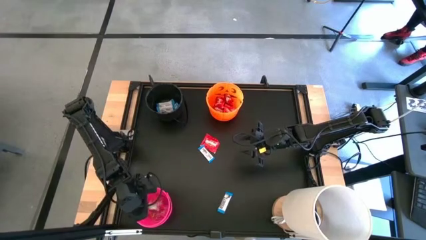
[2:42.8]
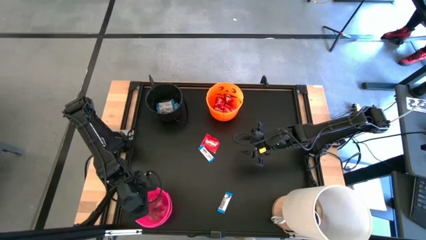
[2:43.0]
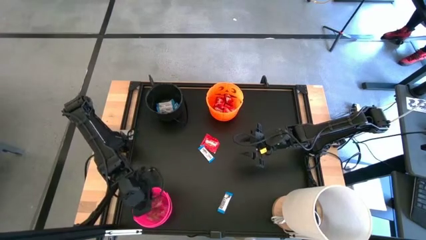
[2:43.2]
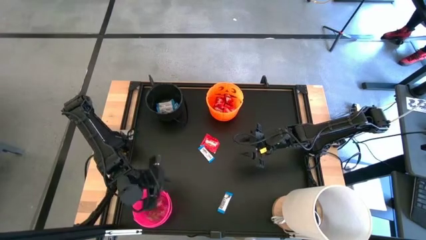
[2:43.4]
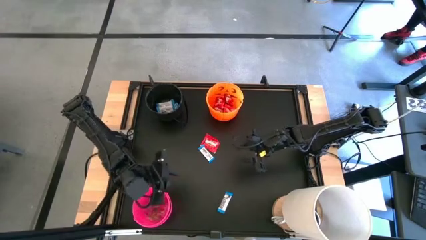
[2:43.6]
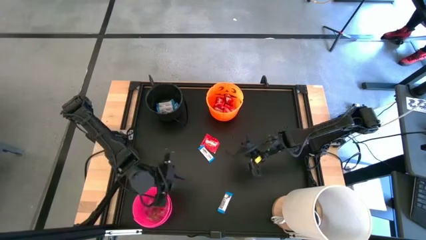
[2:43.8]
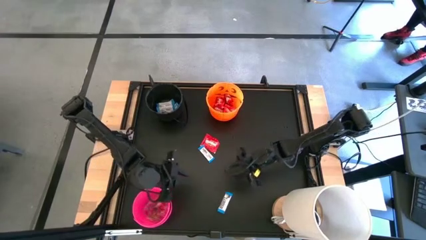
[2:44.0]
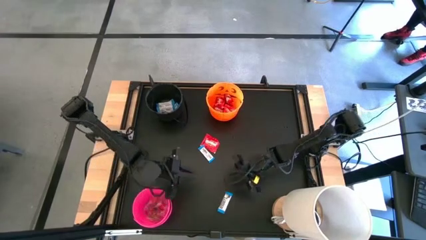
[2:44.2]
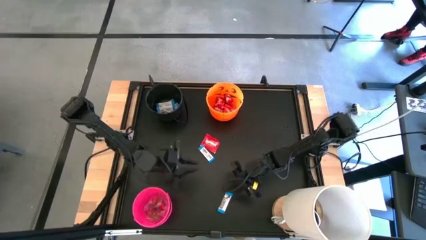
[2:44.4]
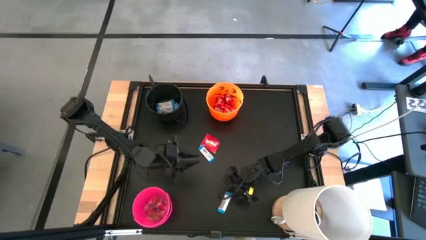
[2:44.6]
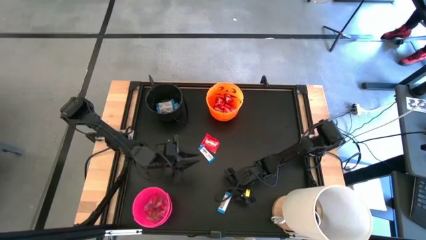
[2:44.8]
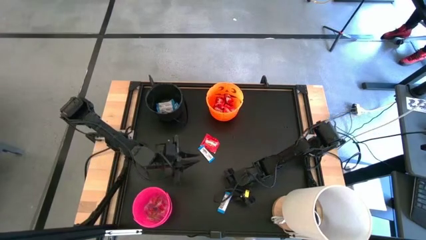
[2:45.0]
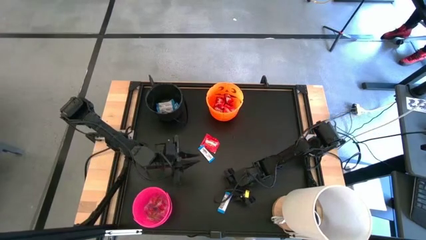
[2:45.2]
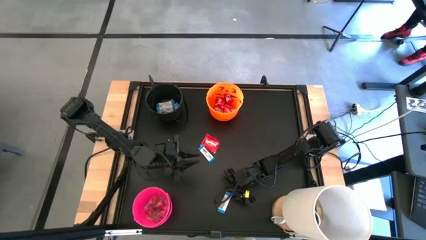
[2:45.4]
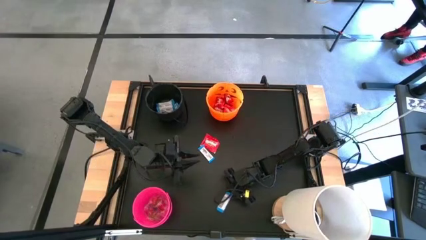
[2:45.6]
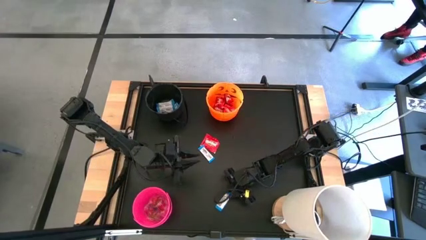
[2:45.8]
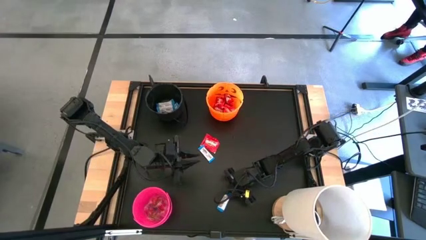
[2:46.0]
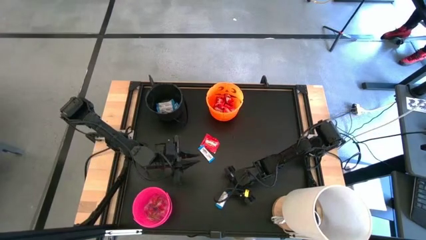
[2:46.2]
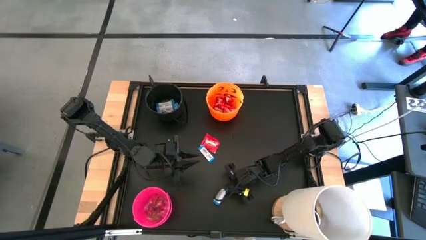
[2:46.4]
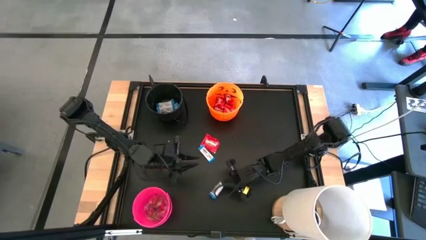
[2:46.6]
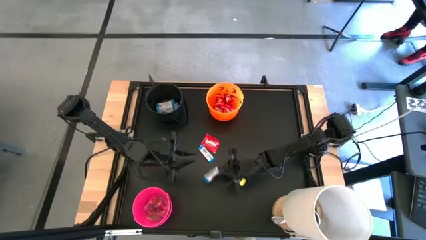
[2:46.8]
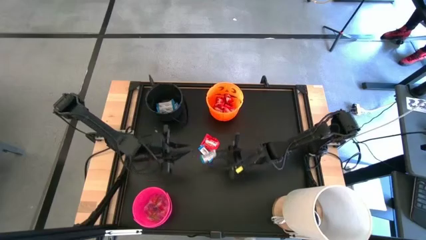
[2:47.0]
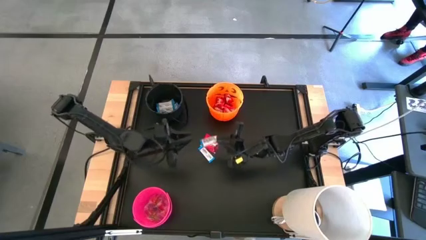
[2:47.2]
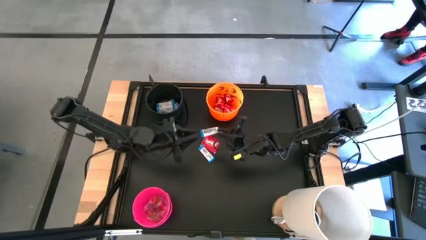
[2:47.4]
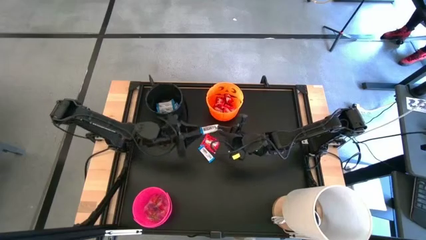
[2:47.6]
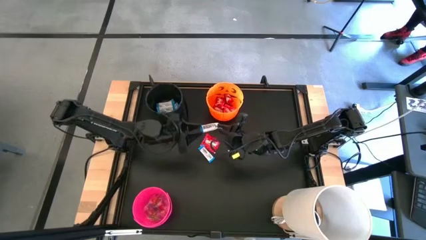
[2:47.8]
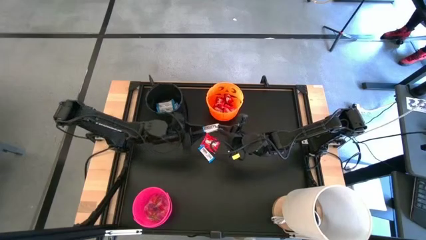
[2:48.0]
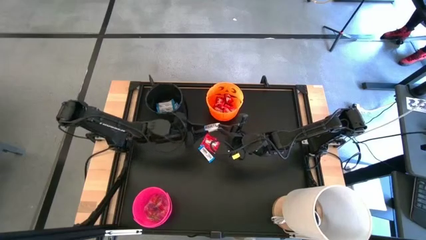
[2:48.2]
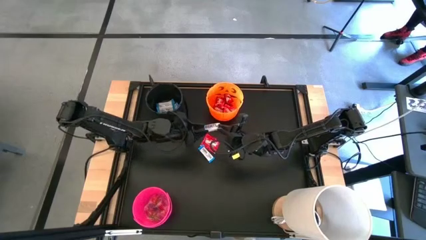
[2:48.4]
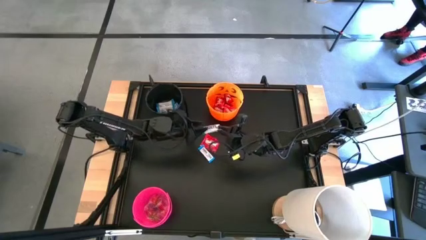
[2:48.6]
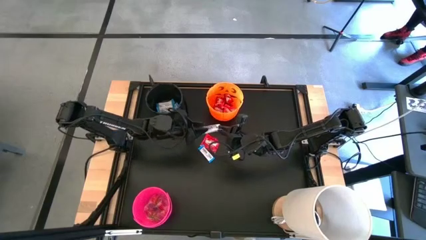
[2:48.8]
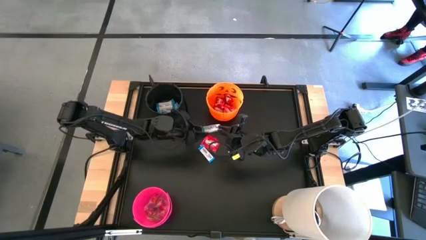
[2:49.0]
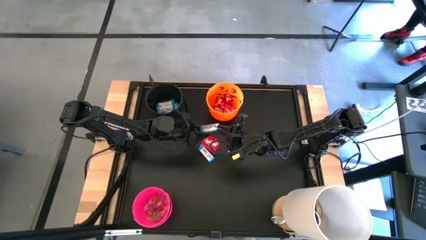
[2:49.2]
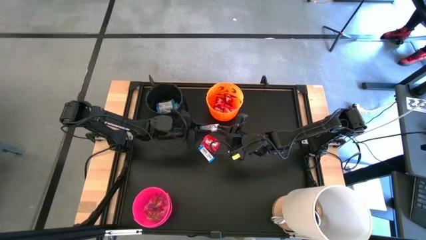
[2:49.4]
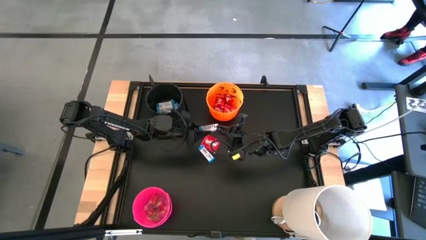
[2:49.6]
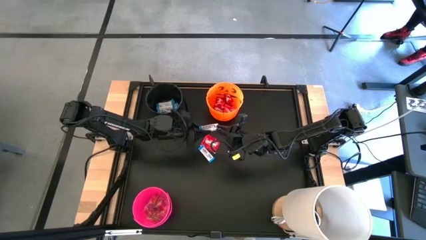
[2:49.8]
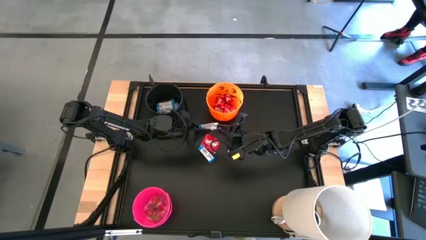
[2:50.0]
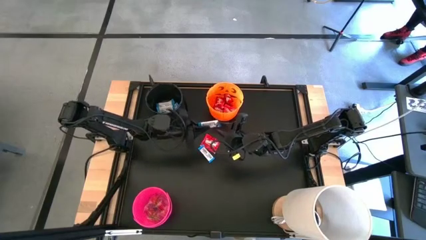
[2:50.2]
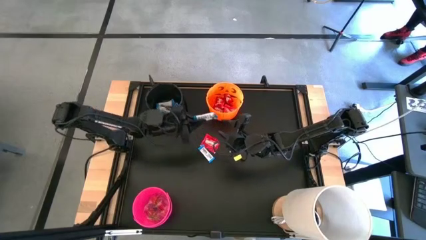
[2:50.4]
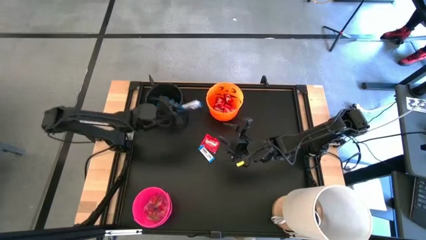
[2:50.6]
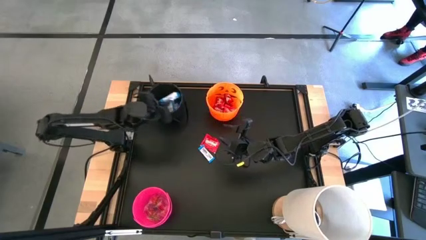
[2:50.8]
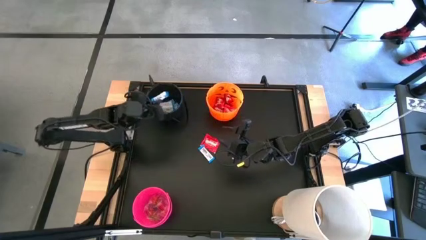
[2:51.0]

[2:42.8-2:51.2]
Task: Sort candy
Put the bottom white candy into the black bin

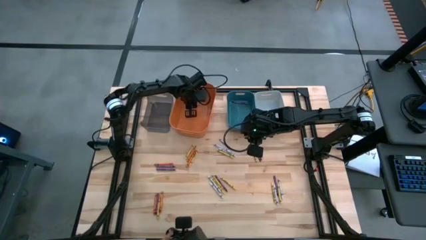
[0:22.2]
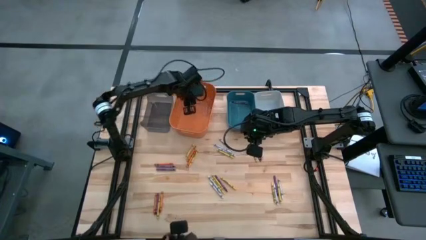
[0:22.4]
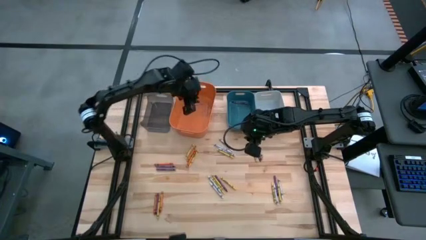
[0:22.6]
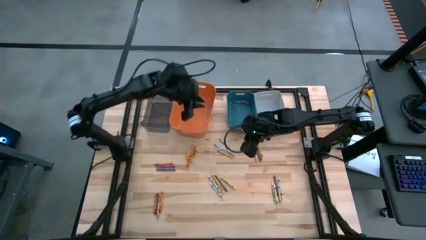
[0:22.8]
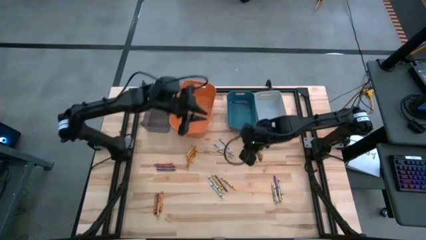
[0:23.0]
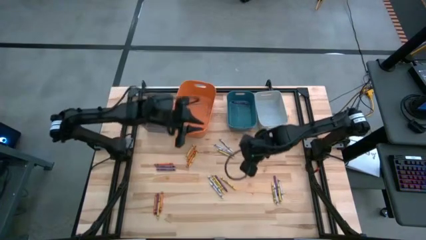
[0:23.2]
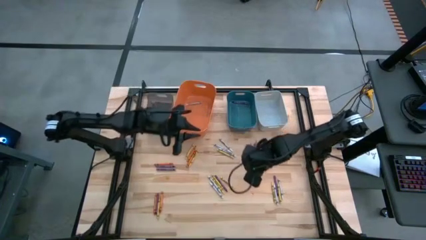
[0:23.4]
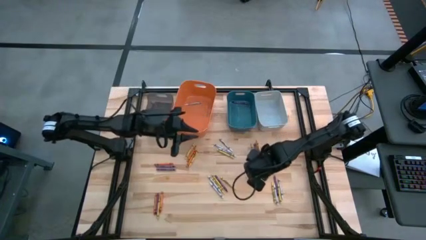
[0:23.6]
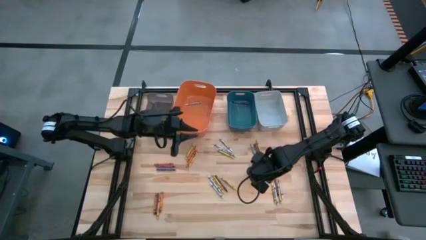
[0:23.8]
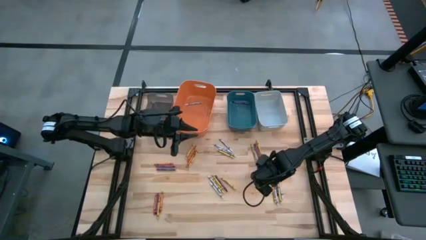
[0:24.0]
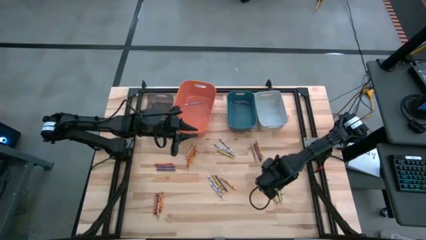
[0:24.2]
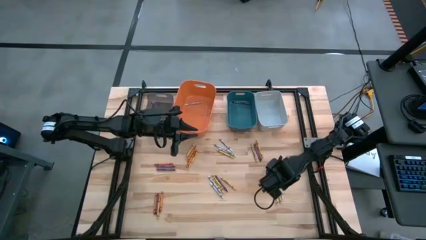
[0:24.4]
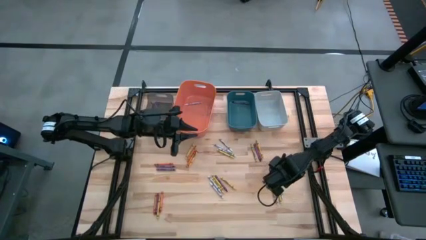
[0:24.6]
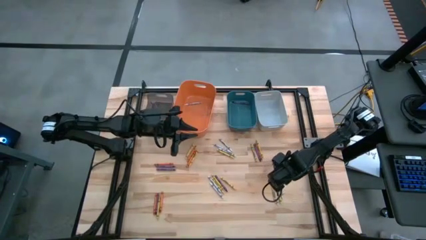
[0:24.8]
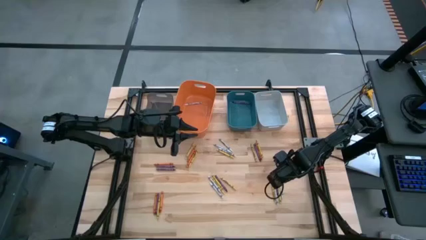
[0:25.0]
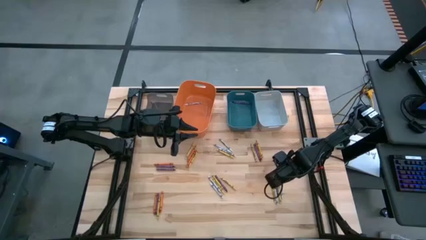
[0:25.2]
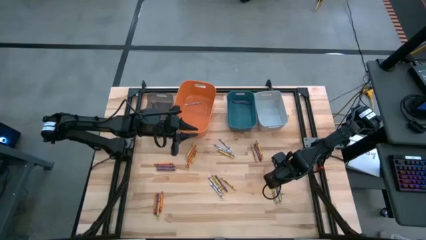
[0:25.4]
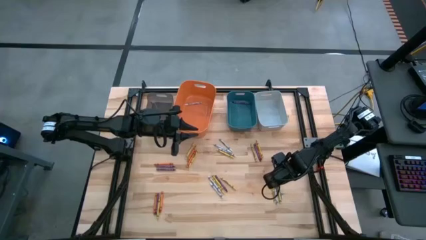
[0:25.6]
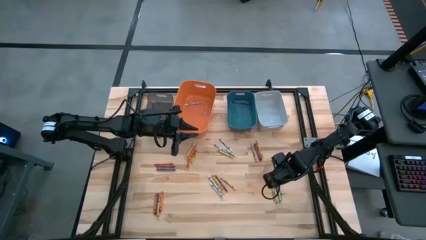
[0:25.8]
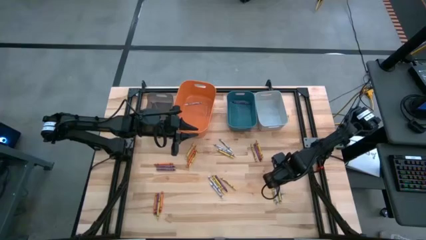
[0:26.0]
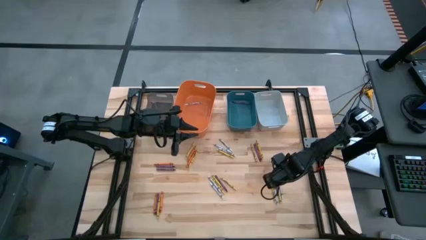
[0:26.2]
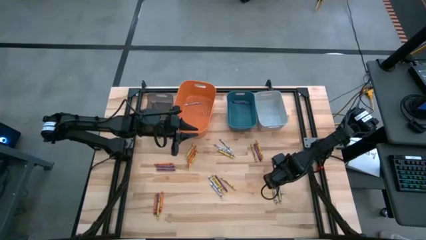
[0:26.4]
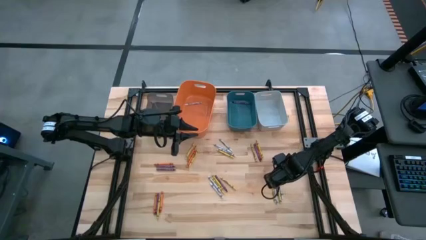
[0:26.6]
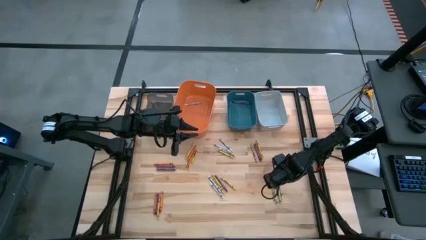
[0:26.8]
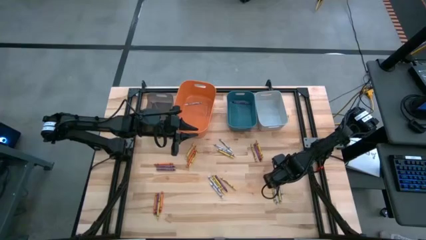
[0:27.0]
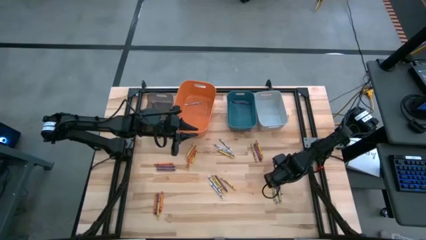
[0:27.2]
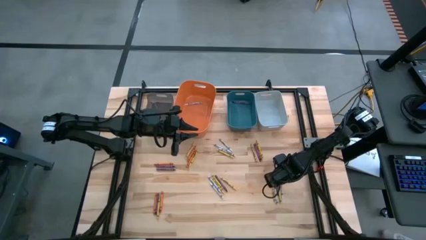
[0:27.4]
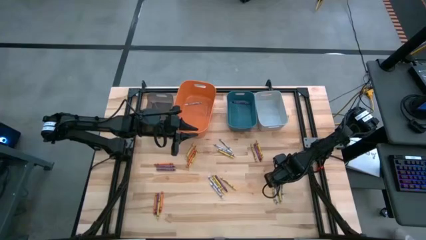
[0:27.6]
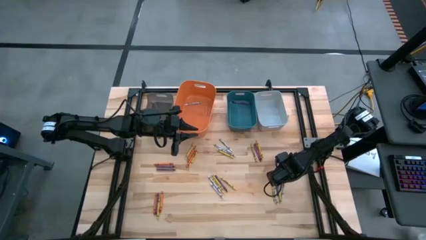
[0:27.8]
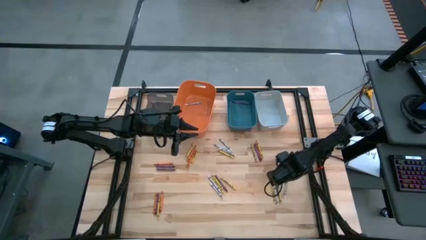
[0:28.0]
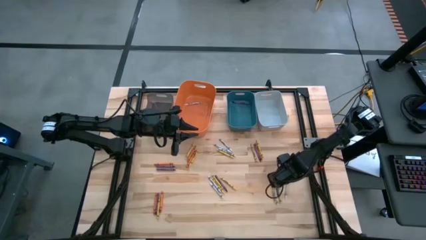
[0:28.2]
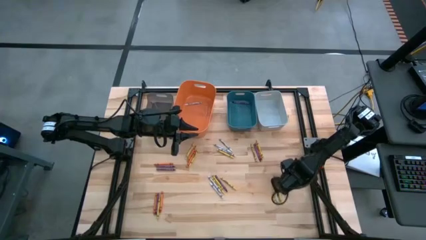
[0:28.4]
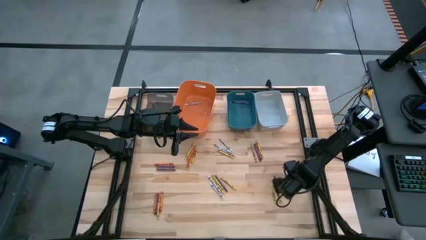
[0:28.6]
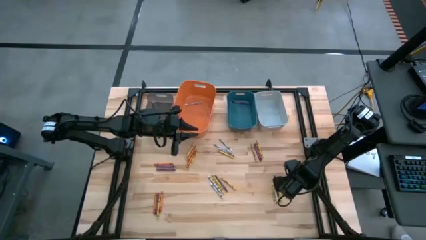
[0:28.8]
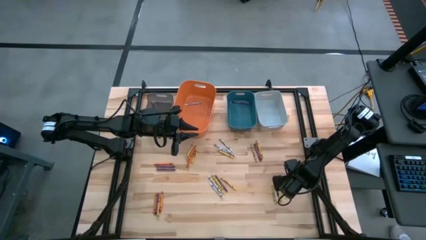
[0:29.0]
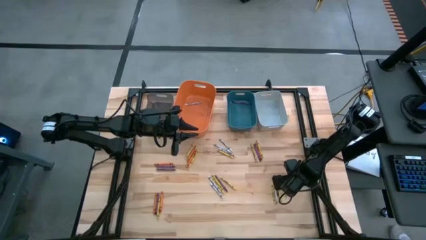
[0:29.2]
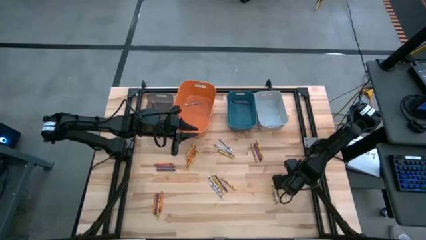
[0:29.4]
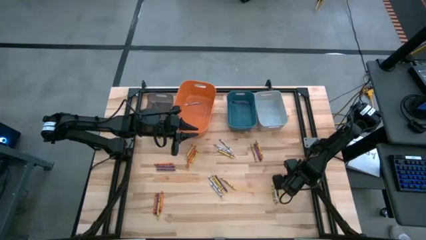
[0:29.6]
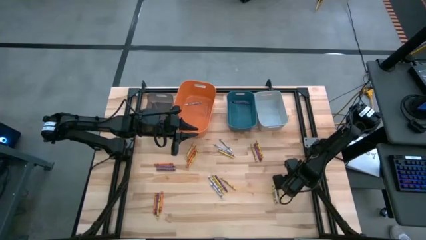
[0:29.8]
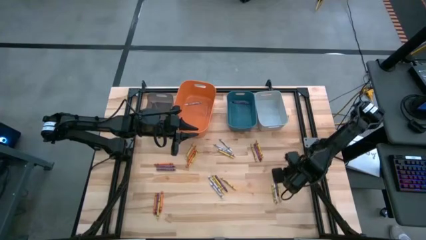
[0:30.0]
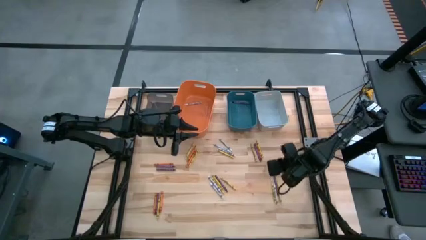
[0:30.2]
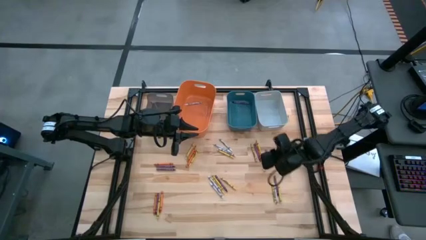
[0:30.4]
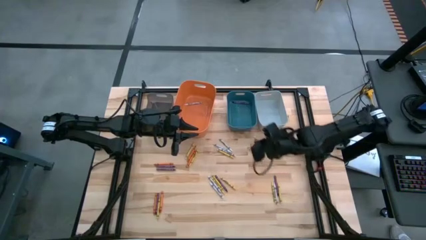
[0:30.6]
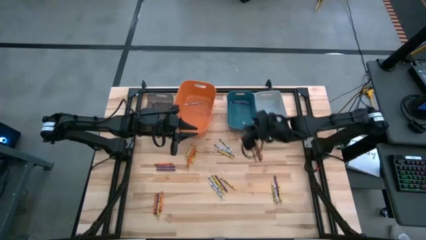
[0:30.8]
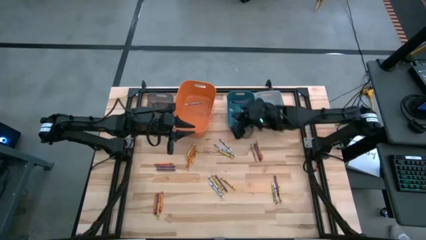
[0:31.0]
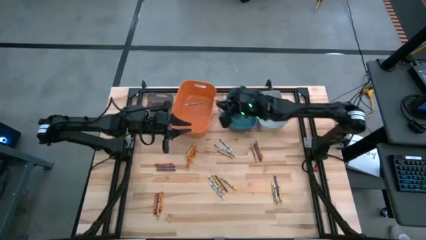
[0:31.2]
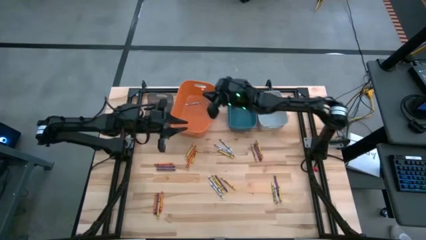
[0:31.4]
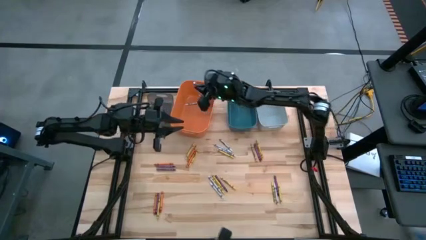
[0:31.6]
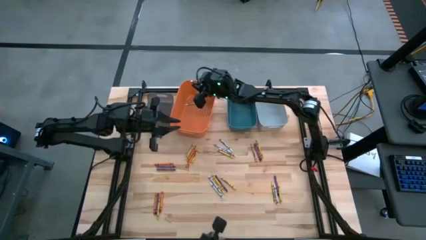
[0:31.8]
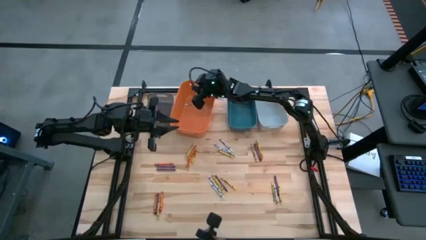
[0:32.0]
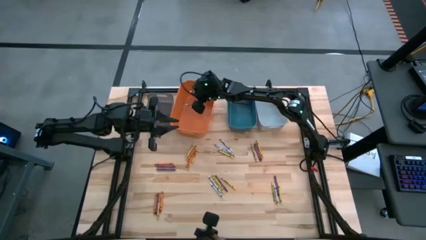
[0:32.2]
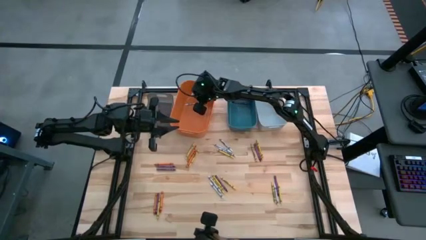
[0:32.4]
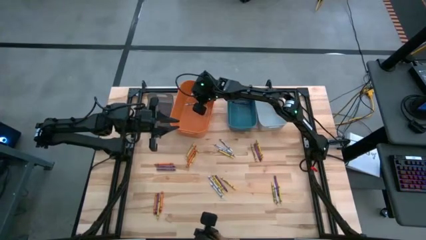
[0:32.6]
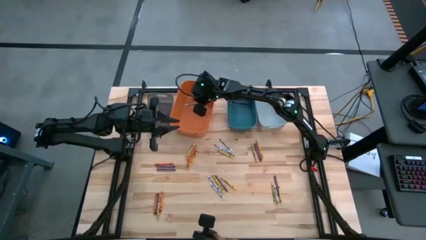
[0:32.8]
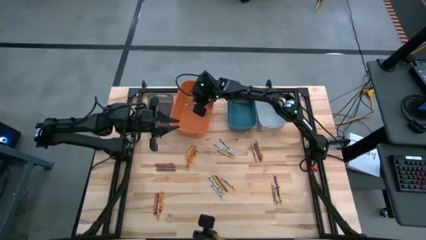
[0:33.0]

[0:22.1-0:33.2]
Task: Sort crayons
Put the white crayon into the orange bin
